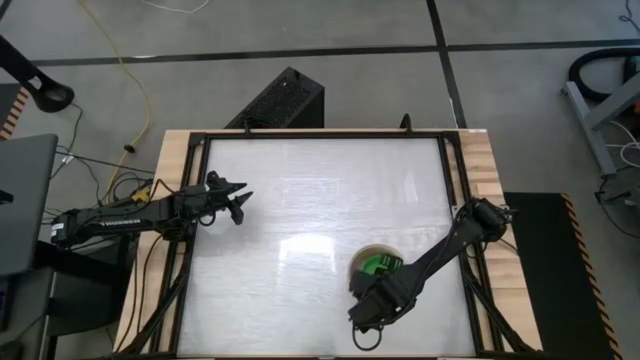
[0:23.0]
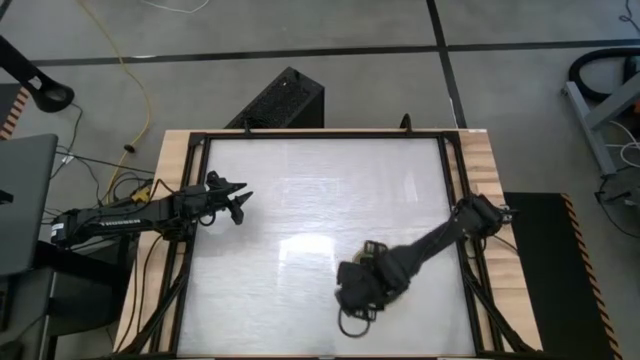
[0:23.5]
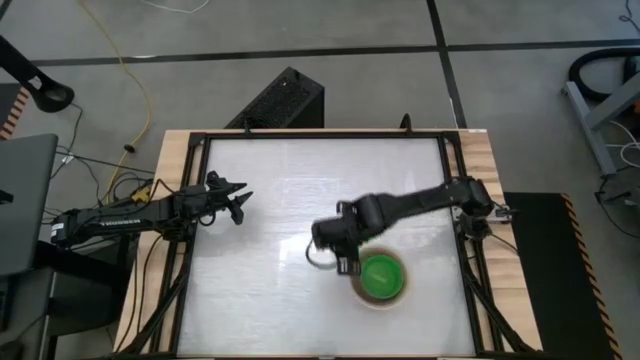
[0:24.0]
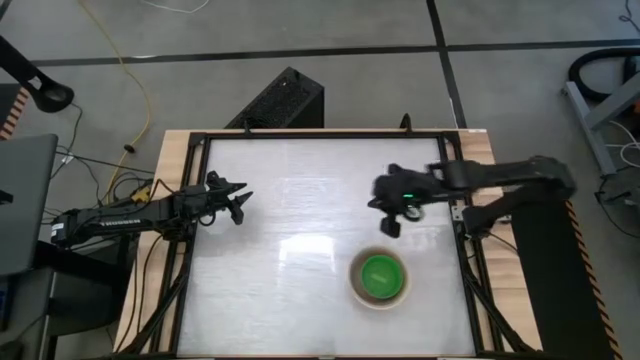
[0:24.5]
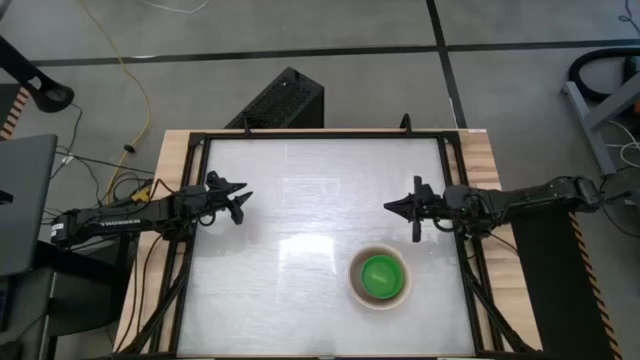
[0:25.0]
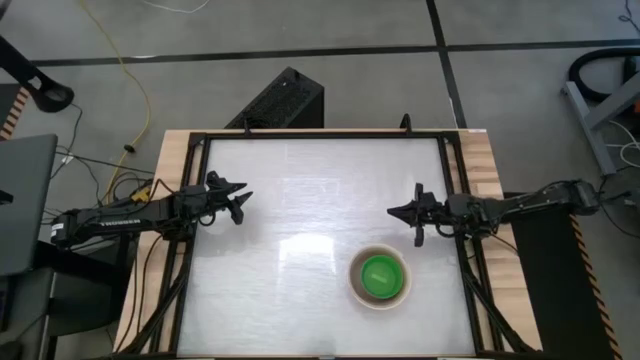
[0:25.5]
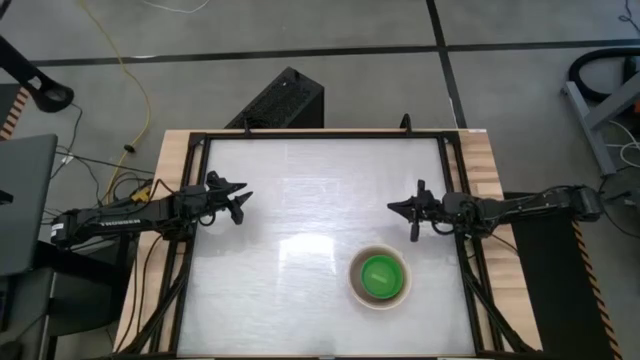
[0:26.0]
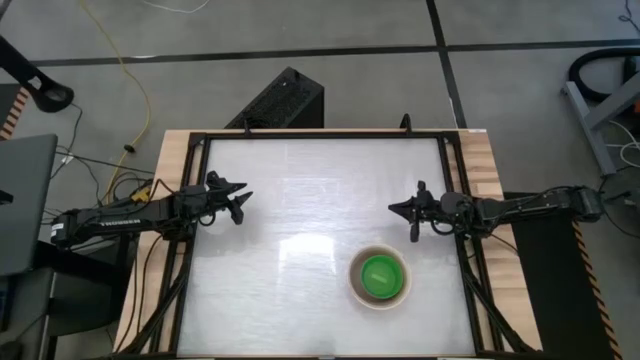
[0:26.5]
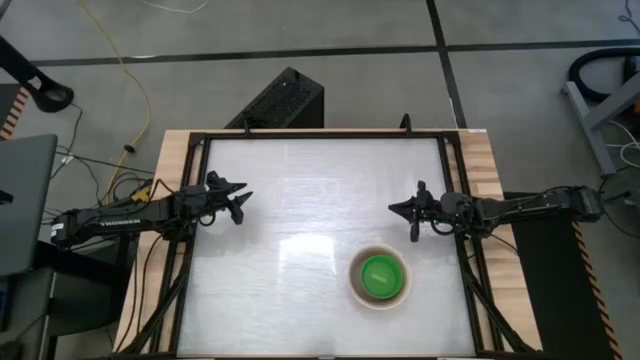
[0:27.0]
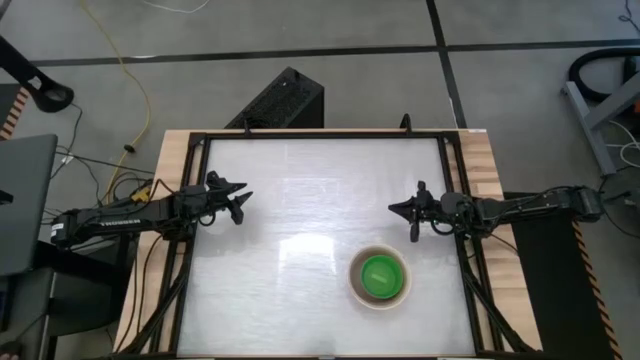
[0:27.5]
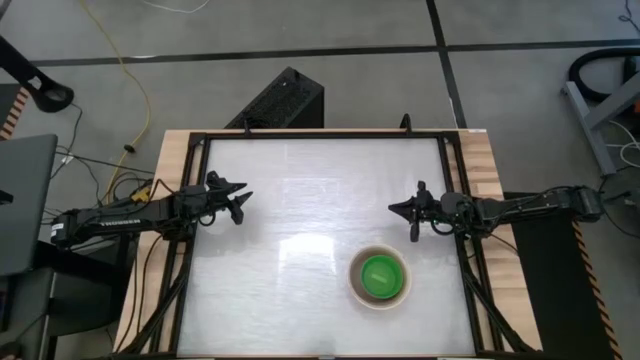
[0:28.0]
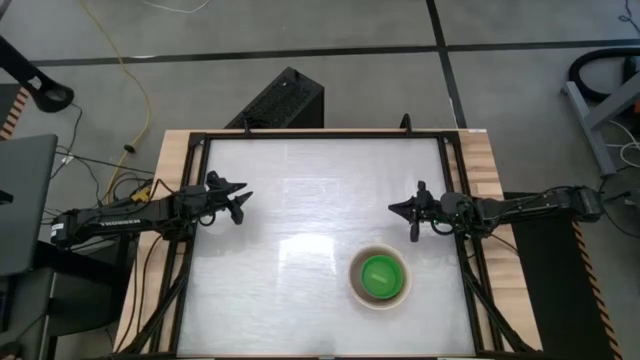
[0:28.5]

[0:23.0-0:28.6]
Return to Home Position

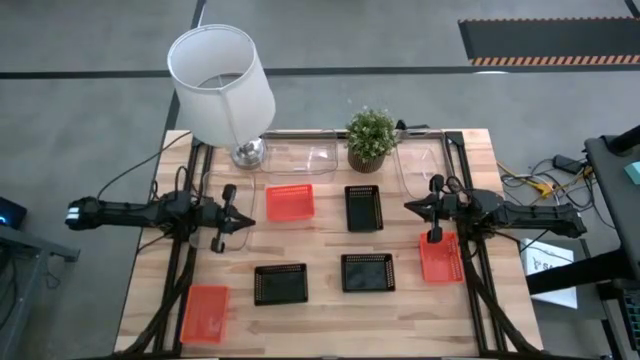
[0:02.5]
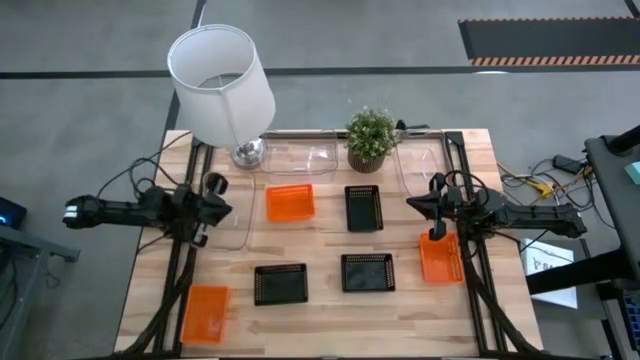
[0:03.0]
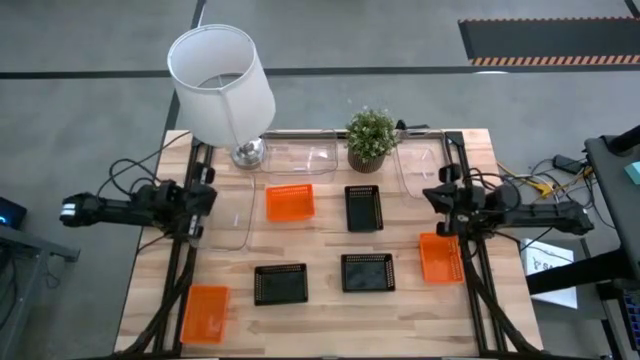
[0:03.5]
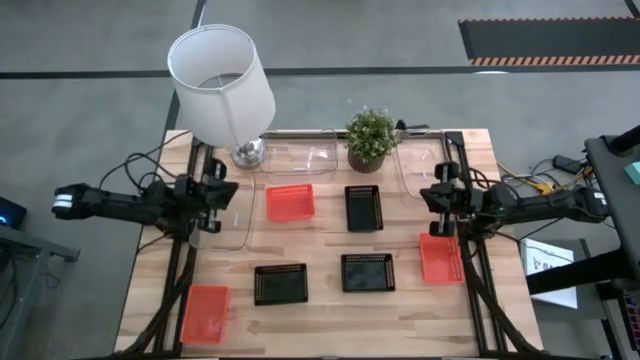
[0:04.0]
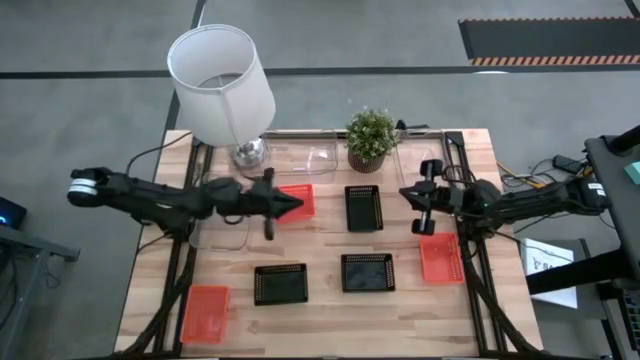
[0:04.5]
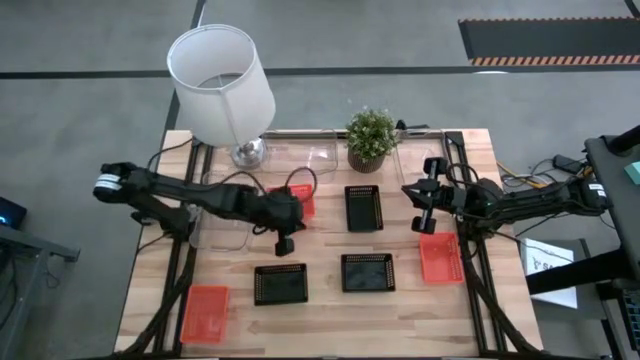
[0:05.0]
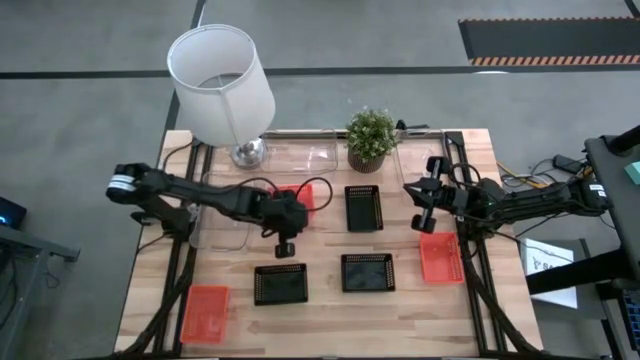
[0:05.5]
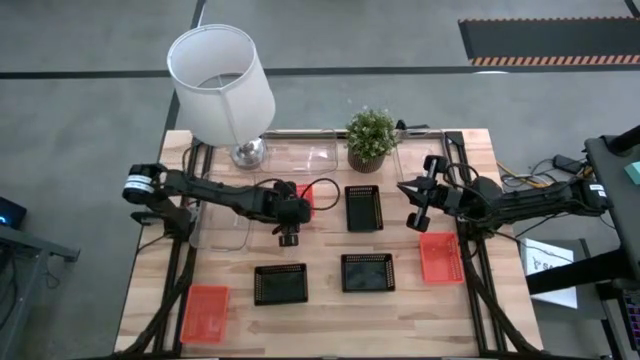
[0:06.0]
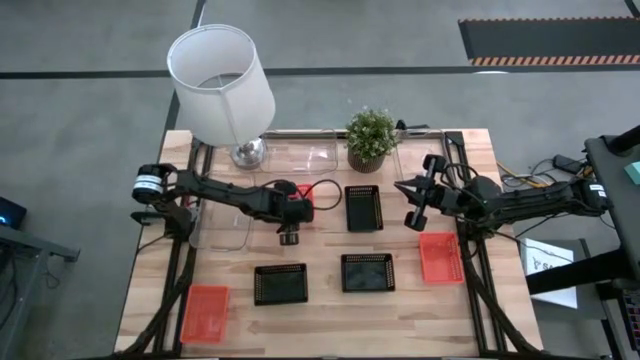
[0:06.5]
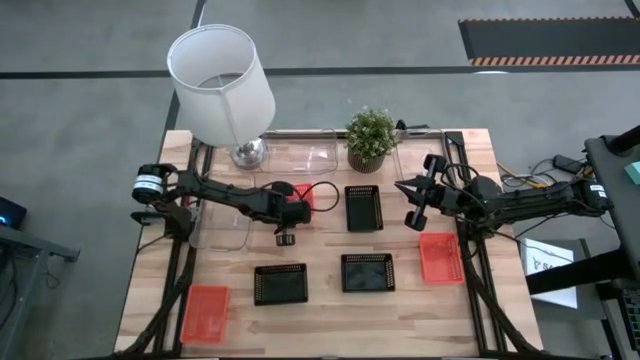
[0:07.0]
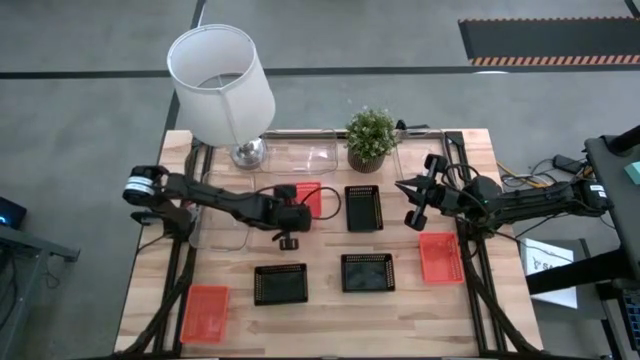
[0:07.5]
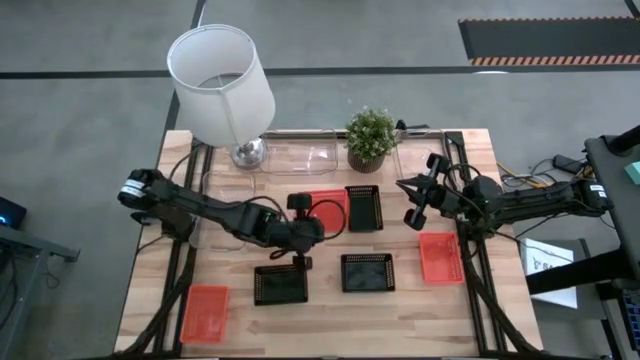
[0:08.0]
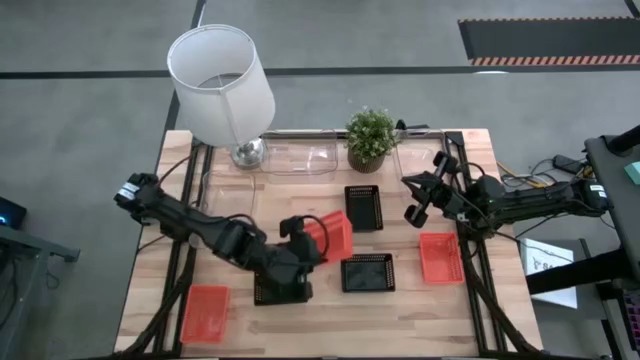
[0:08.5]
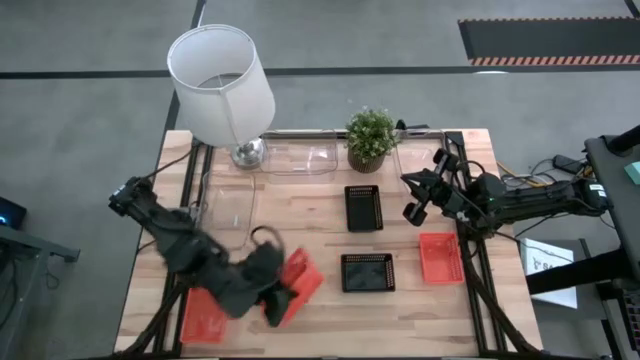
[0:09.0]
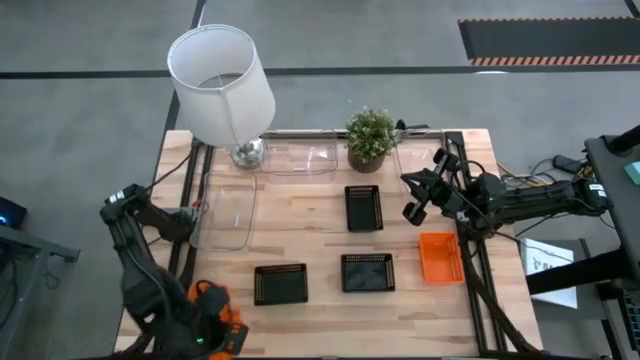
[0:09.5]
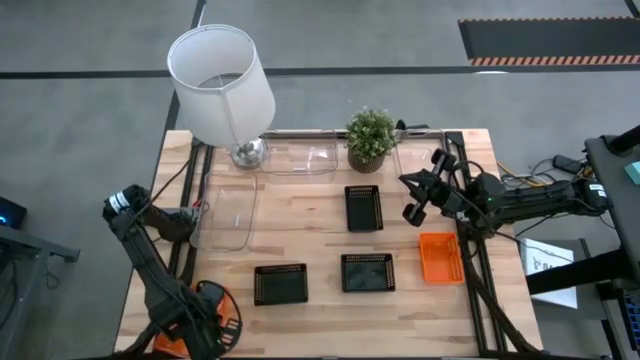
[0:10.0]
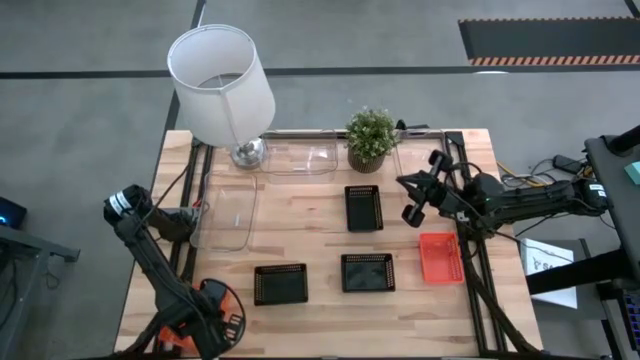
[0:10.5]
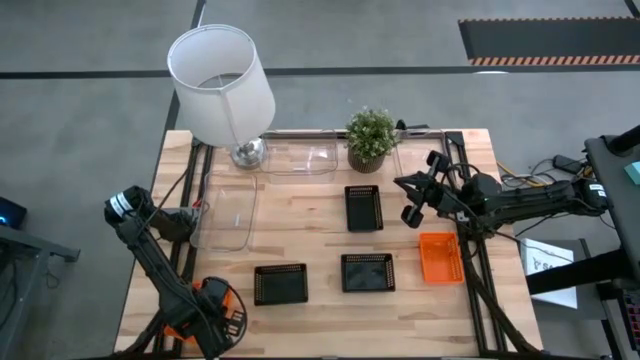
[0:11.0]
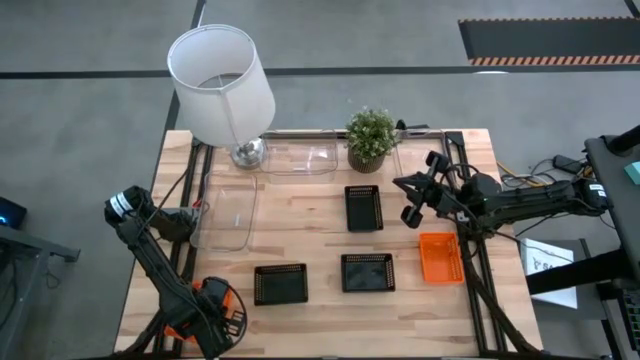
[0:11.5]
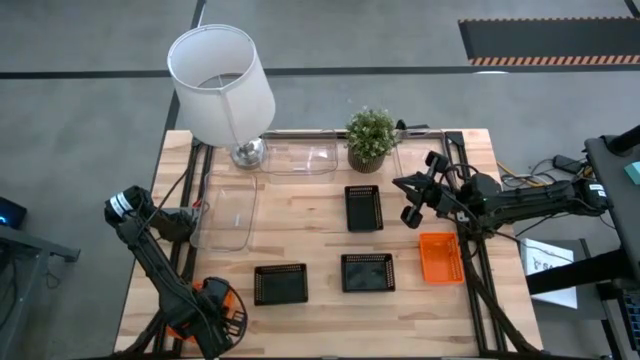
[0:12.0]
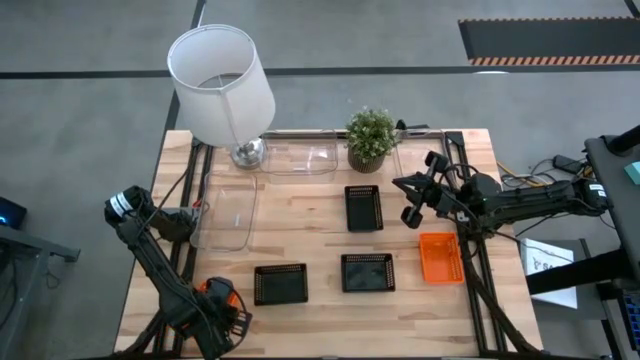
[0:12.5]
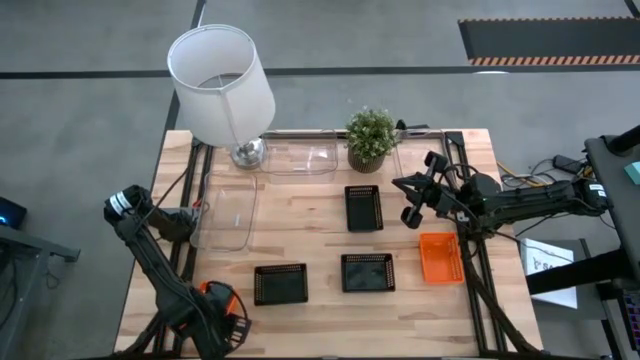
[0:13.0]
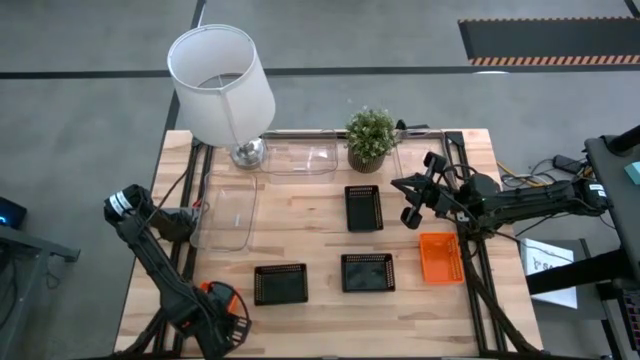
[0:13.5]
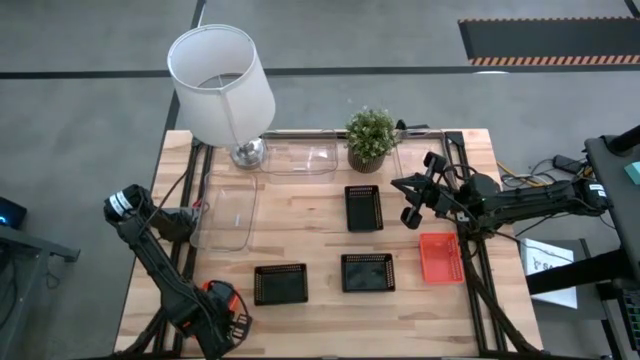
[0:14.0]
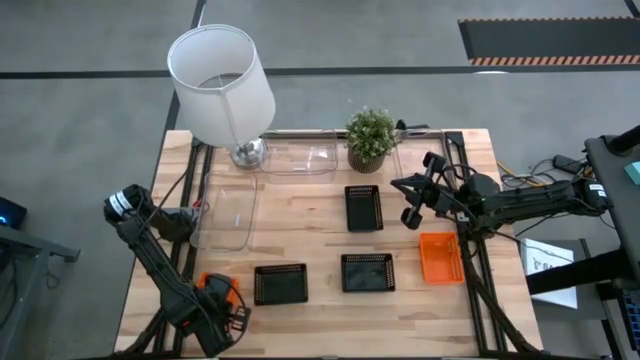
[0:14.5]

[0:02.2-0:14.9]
Stack the top orange bin on the bottom orange bin

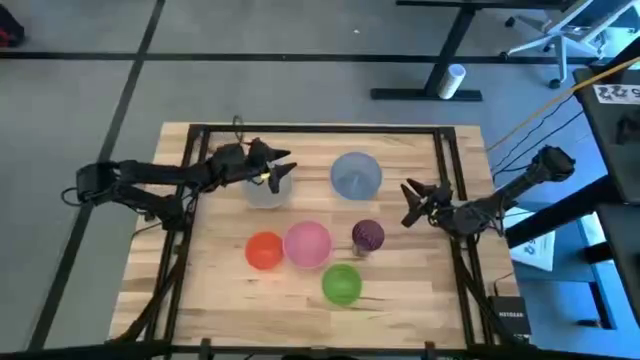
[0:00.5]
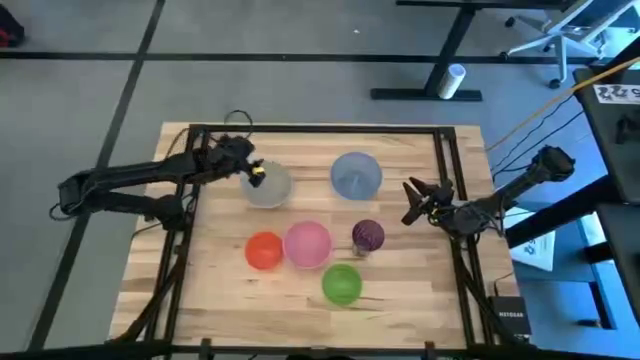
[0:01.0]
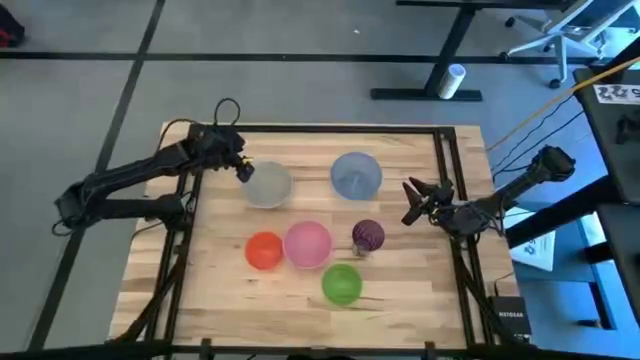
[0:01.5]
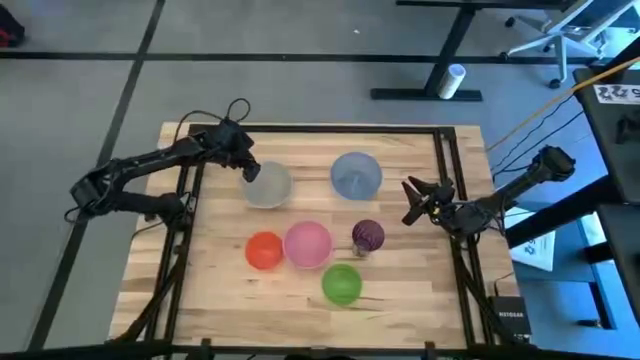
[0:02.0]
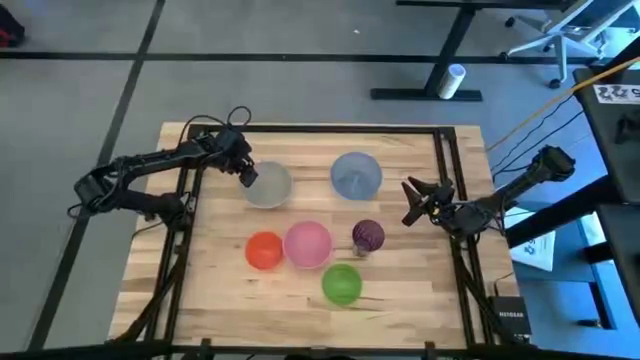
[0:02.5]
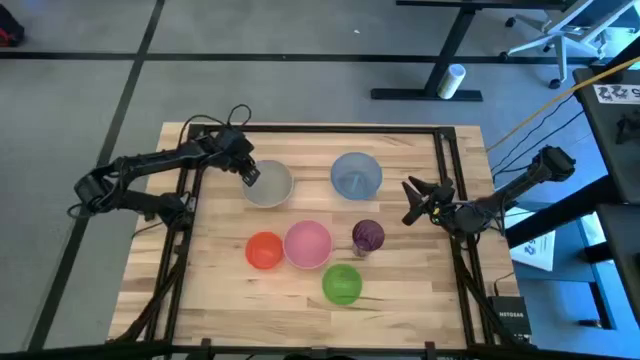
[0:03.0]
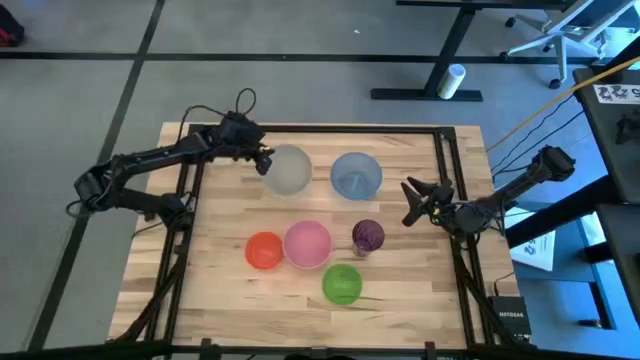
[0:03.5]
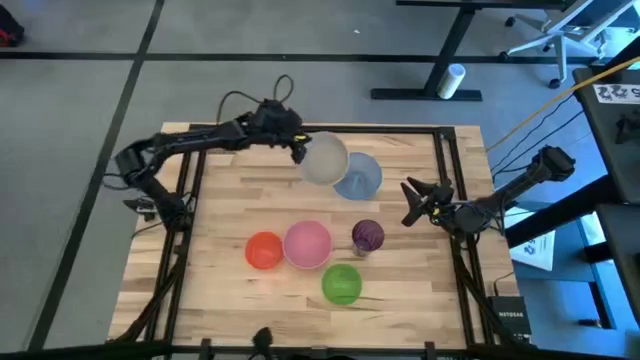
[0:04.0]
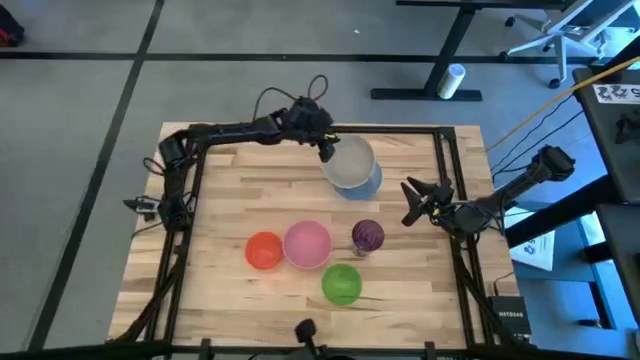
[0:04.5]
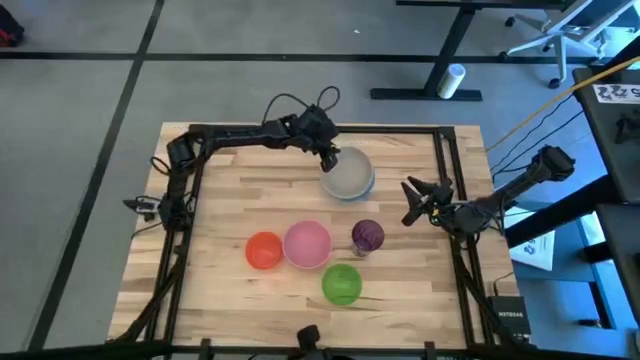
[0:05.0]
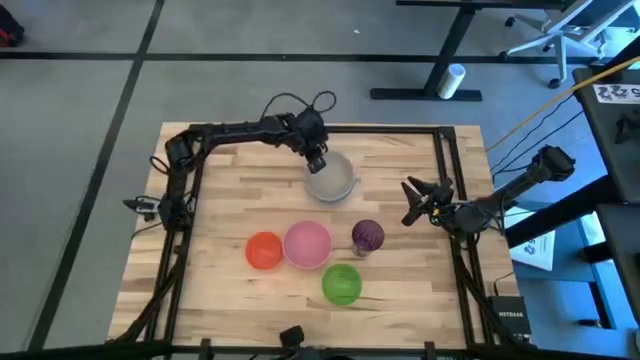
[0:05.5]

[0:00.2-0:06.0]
Stack the gray bowl on top of the blue bowl
